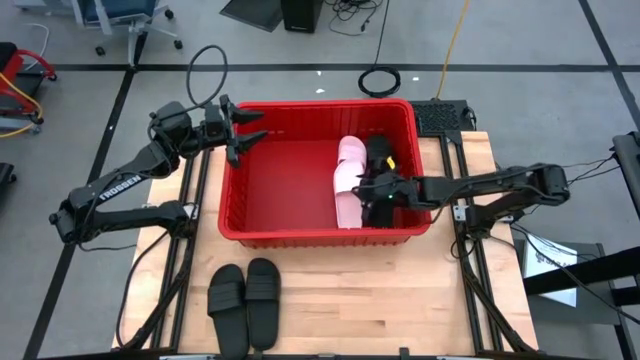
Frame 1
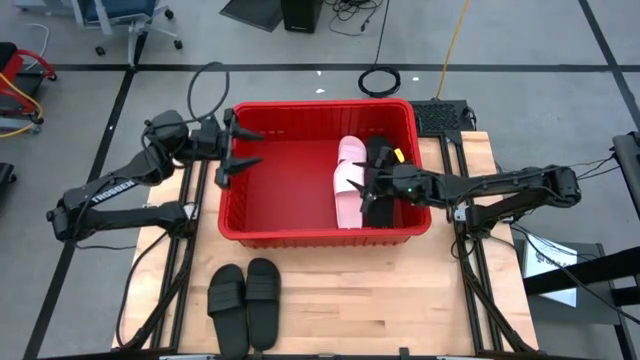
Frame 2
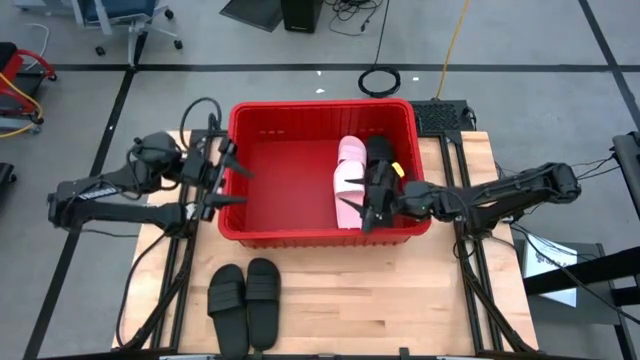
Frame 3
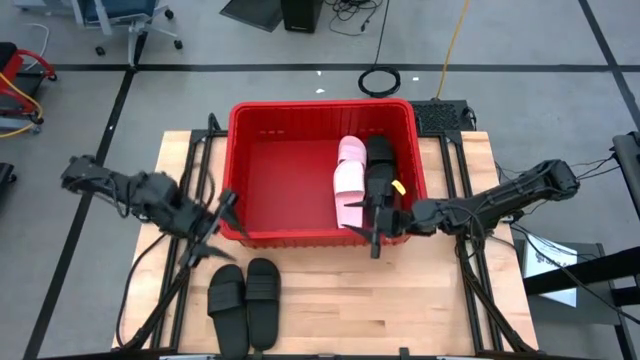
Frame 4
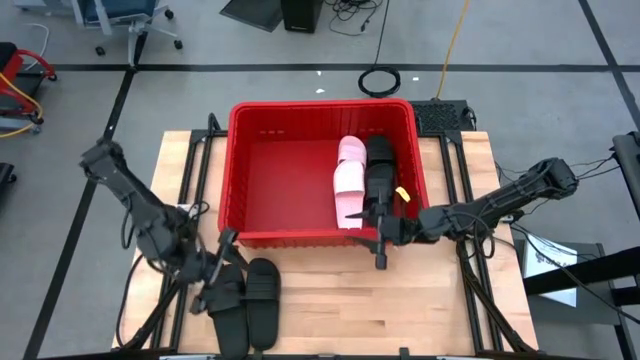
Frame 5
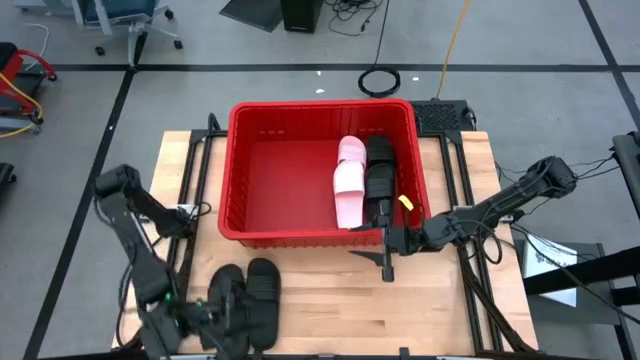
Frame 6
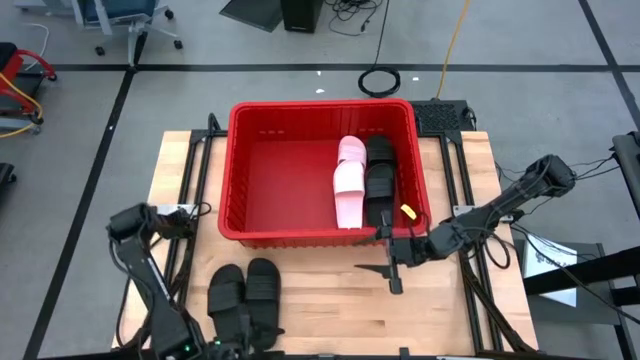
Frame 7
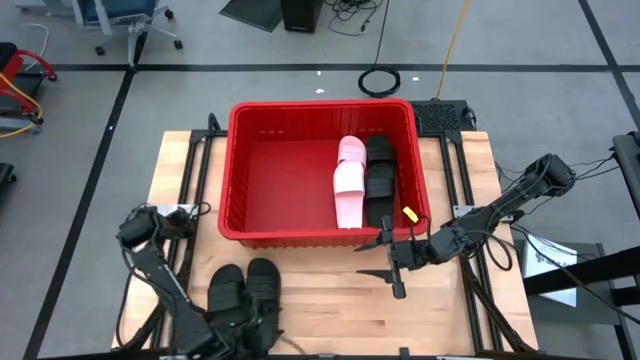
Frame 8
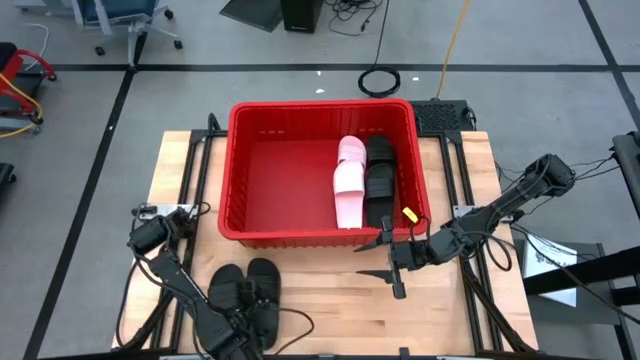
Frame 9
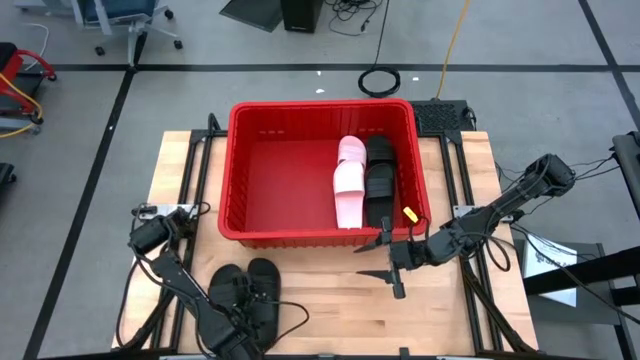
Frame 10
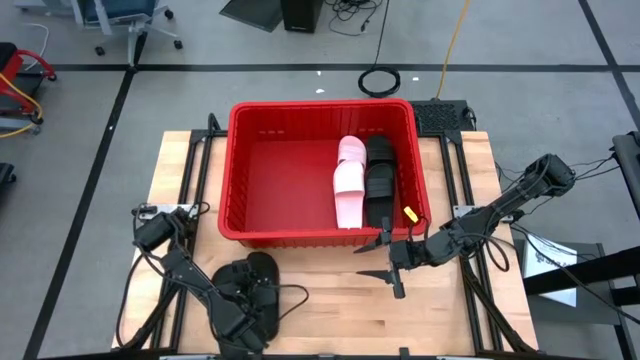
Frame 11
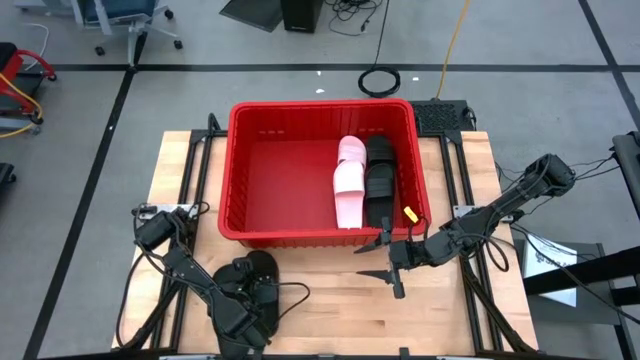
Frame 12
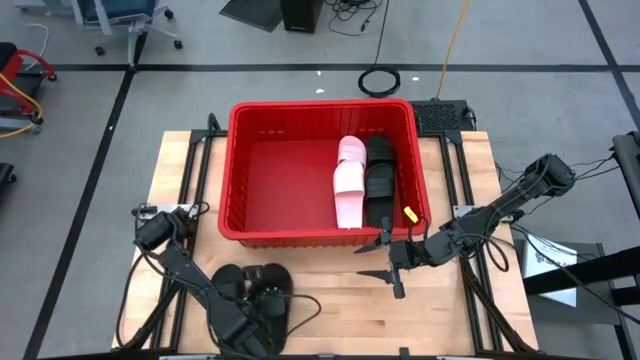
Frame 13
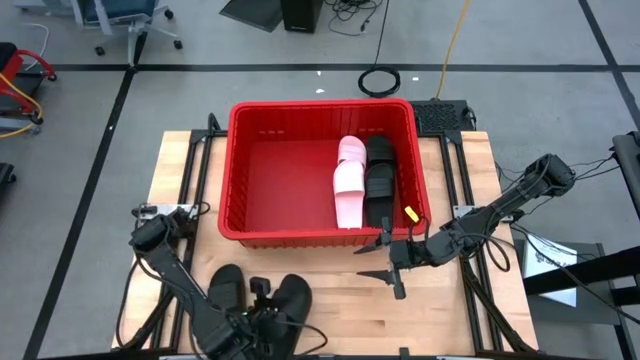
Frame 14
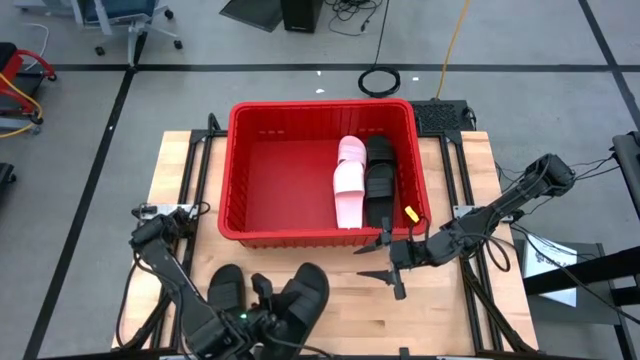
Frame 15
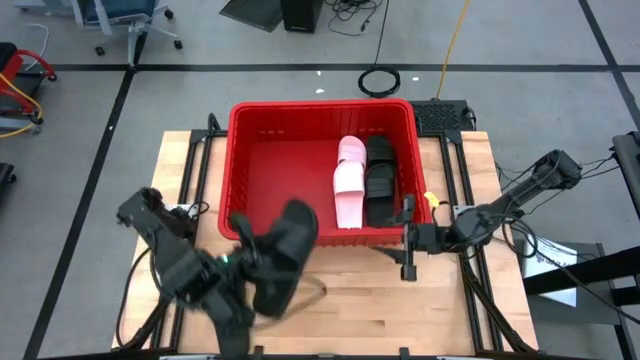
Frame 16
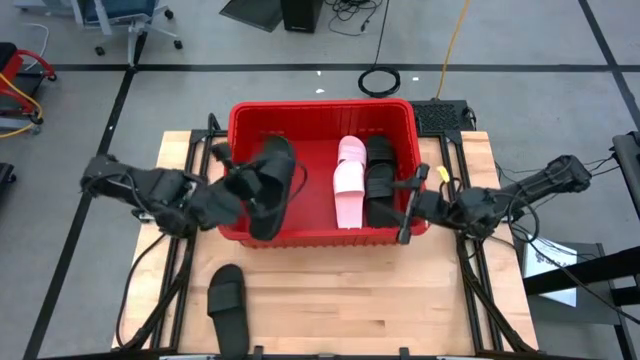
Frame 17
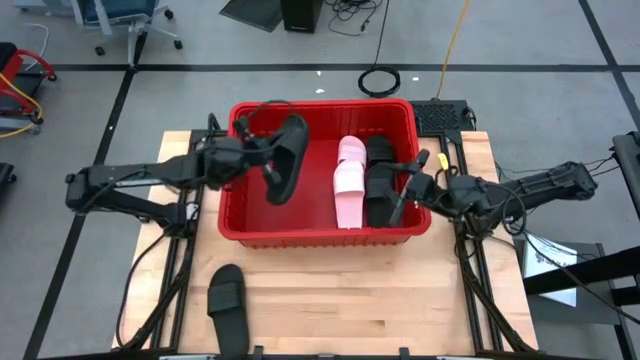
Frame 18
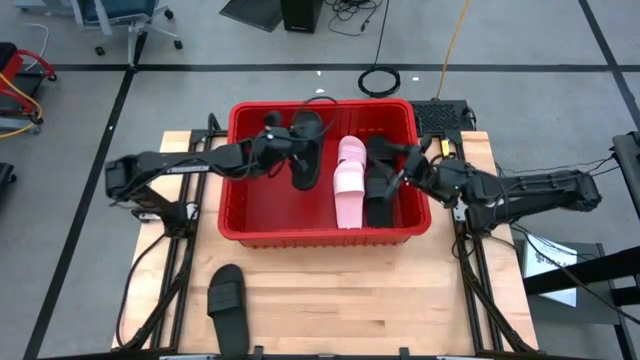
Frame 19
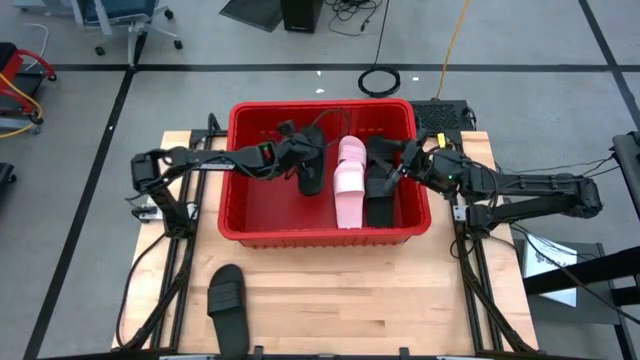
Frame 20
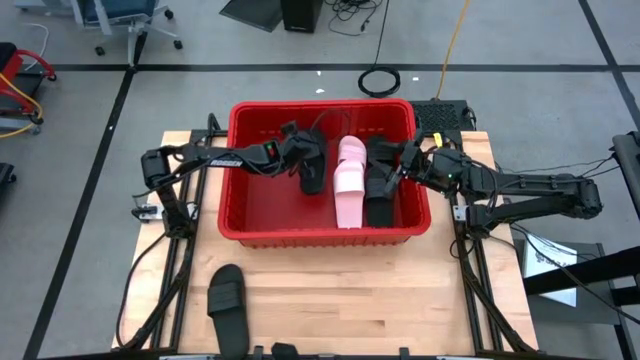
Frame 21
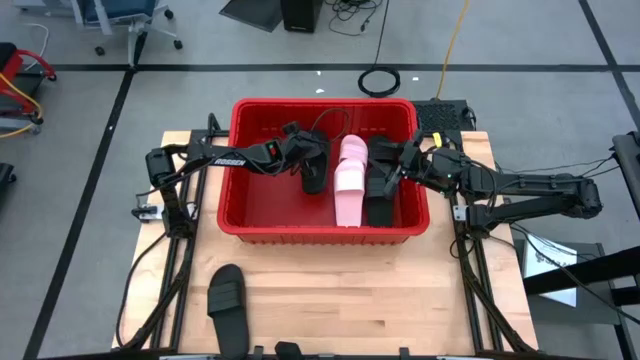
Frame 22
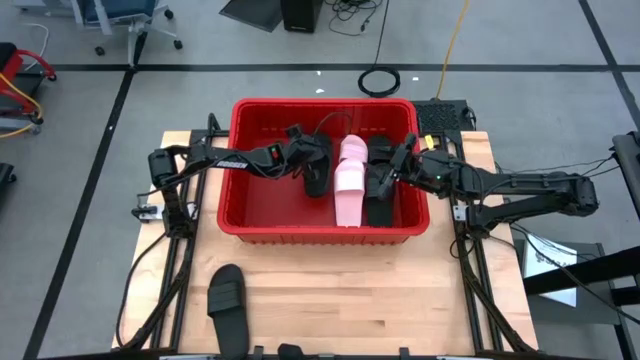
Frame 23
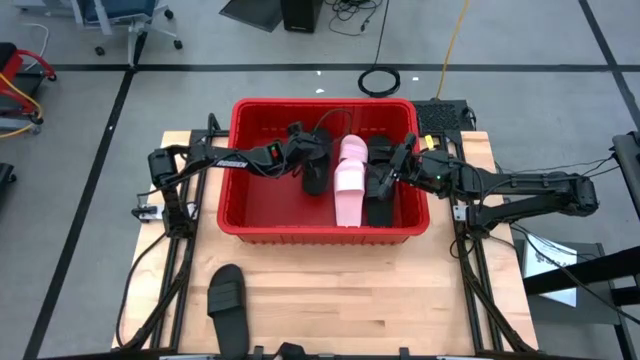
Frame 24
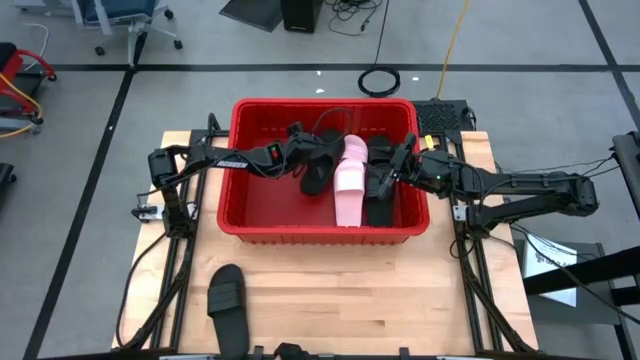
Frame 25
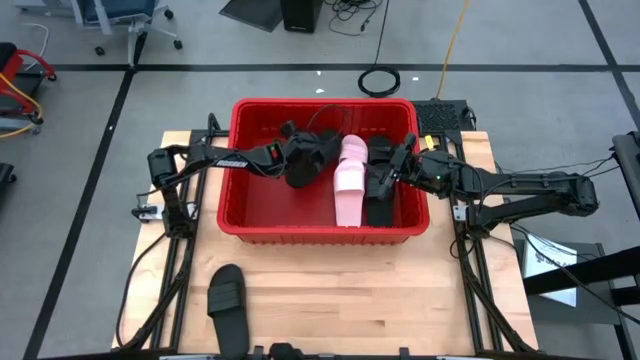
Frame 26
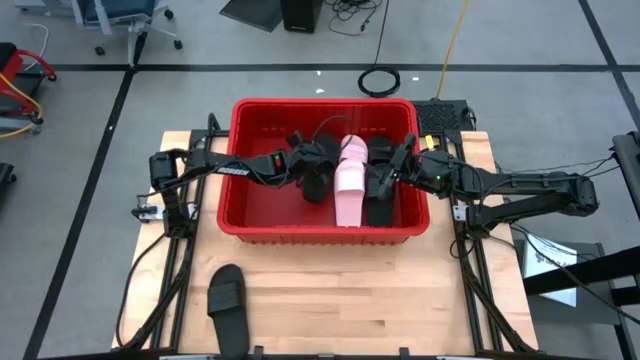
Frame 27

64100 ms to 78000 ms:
Task: Pick and place slides into bin
Put the black slide into the red bin

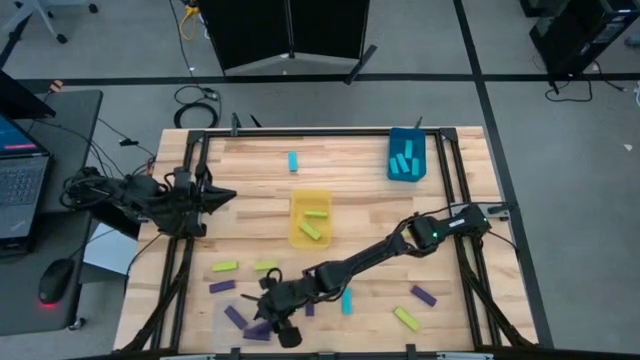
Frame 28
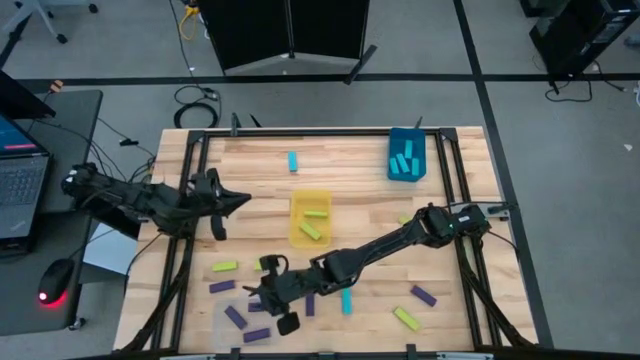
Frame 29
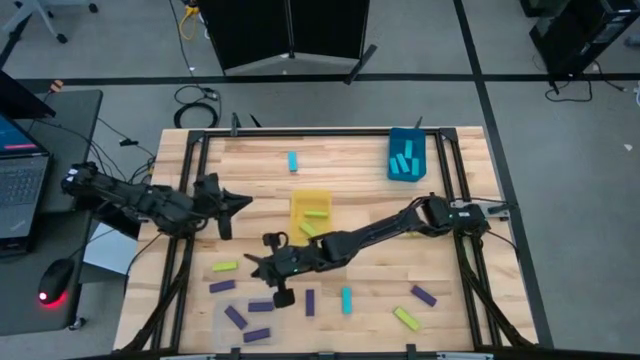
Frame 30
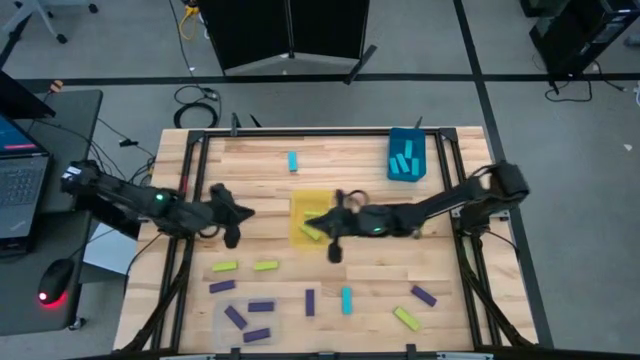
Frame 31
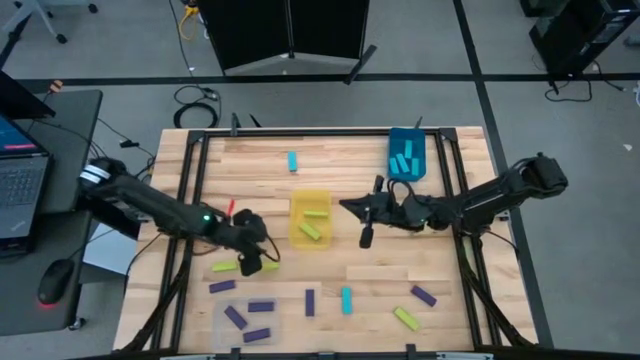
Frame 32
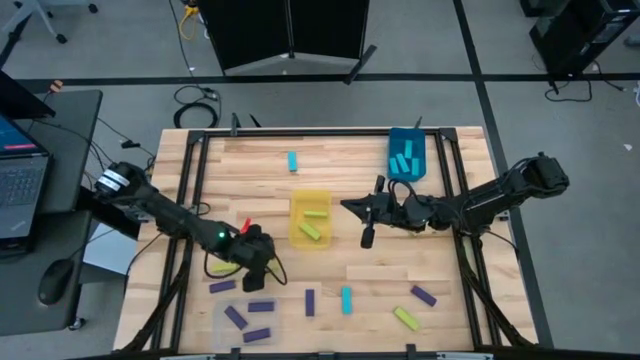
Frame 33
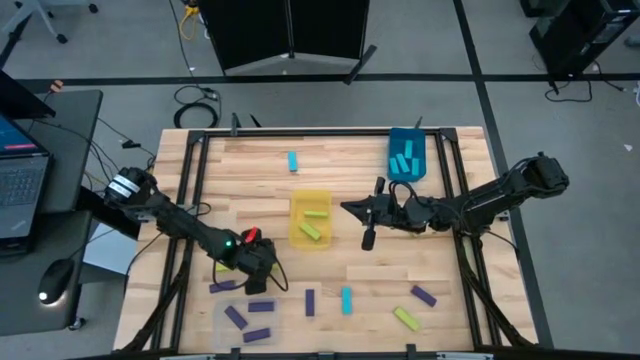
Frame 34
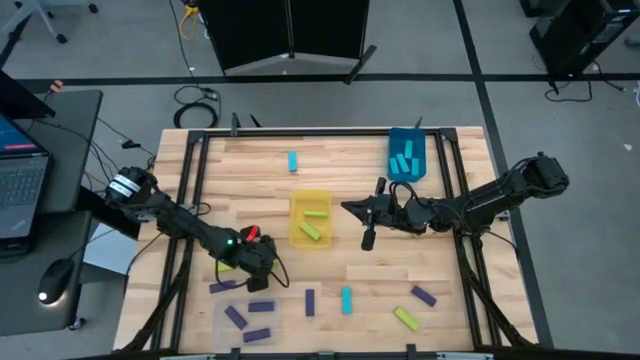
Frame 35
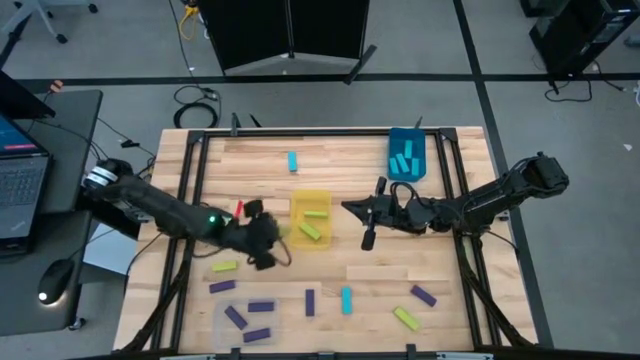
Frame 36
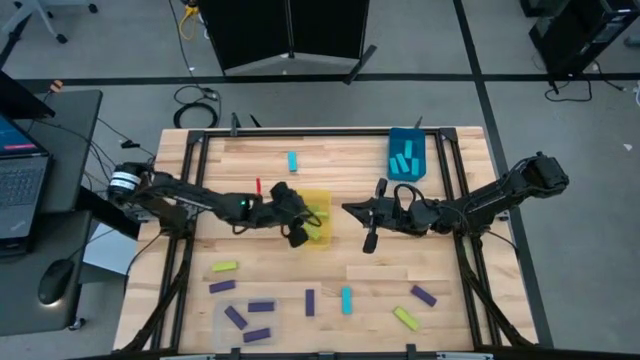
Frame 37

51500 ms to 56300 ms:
Task: Sort blocks
Put the light green block into the yellow bin

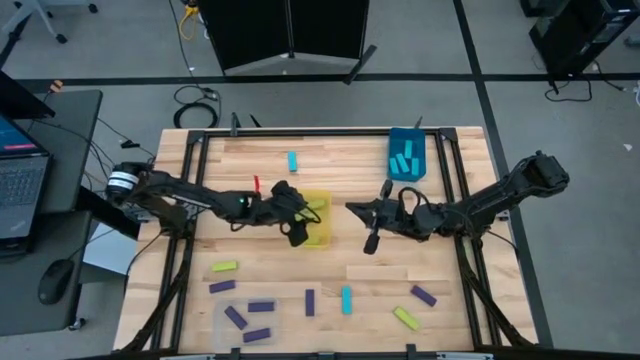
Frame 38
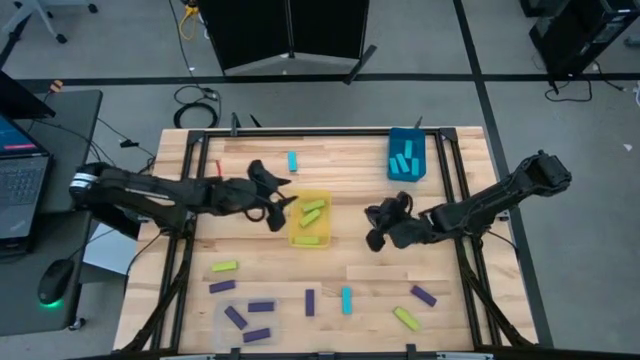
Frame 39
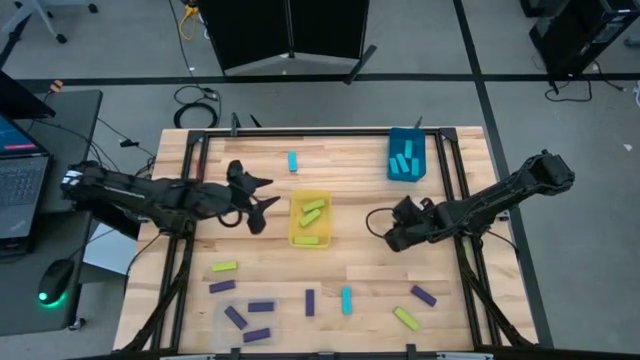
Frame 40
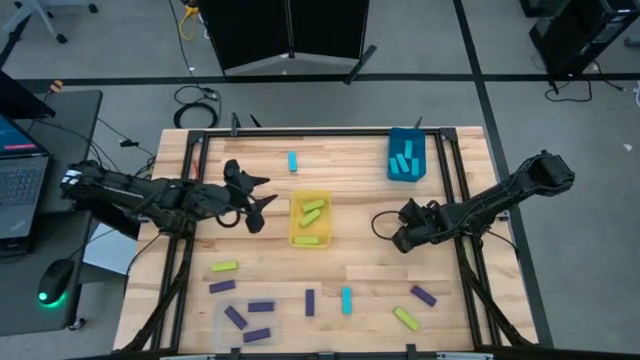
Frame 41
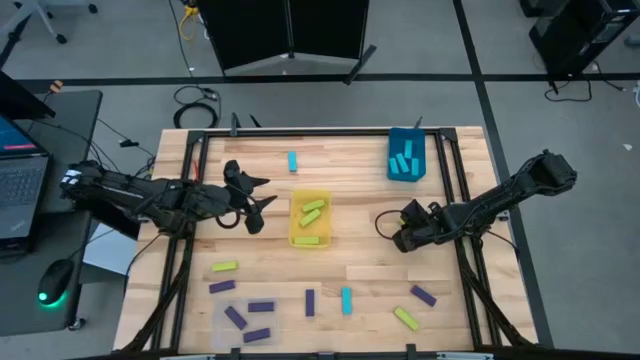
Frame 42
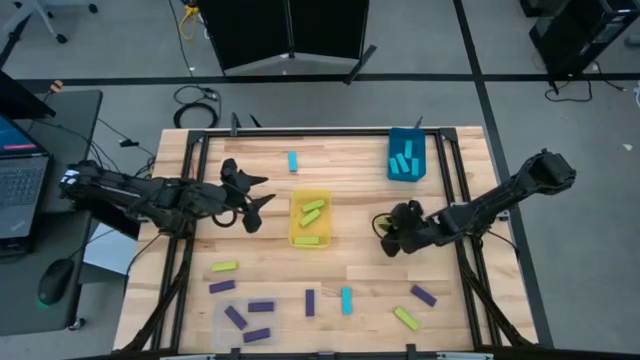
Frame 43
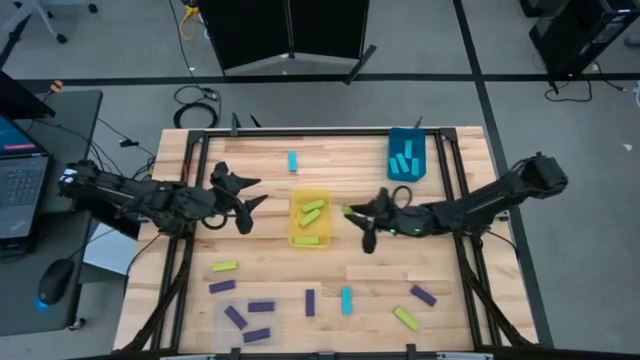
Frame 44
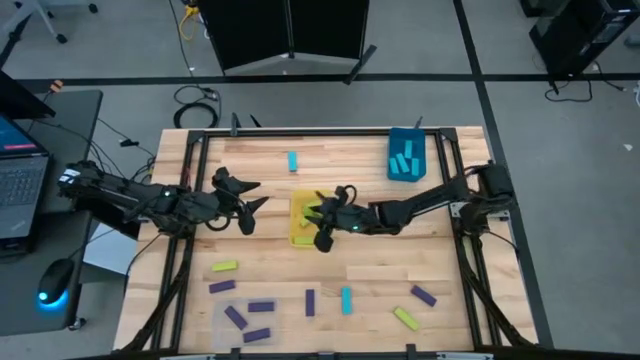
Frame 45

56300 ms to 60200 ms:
Put the light green block into the yellow bin
